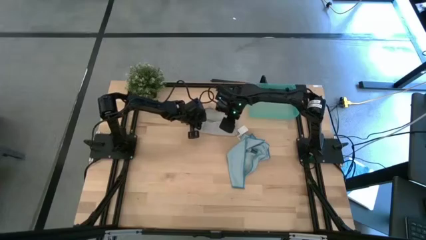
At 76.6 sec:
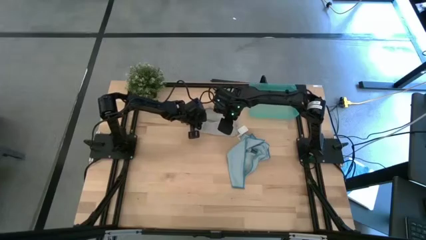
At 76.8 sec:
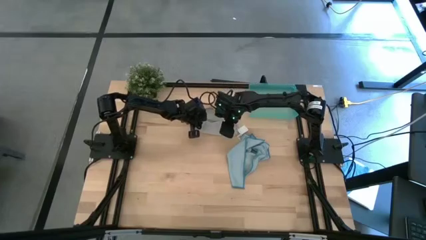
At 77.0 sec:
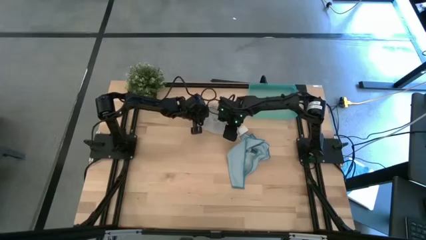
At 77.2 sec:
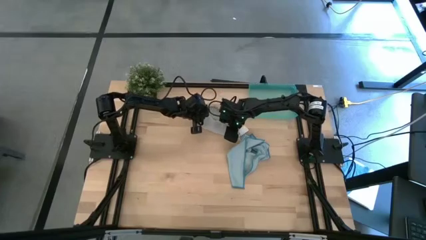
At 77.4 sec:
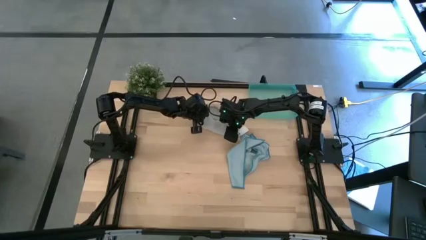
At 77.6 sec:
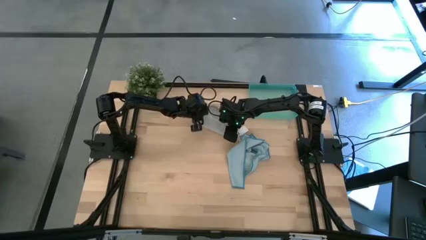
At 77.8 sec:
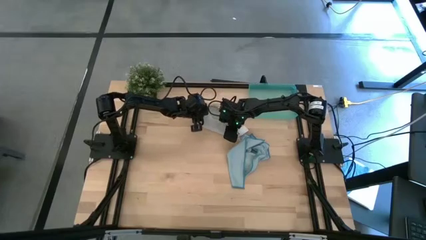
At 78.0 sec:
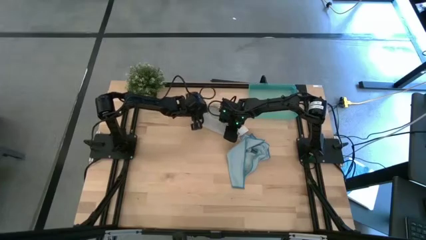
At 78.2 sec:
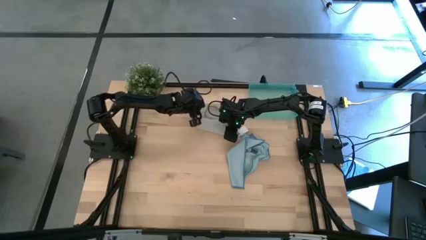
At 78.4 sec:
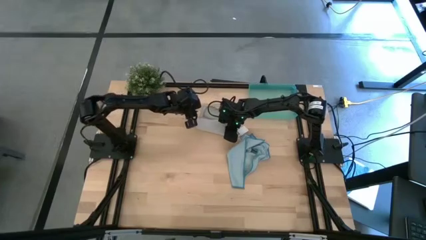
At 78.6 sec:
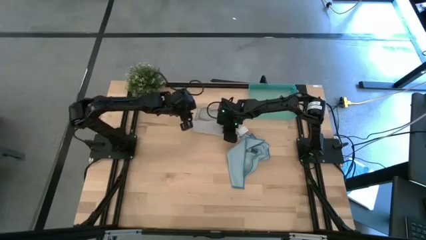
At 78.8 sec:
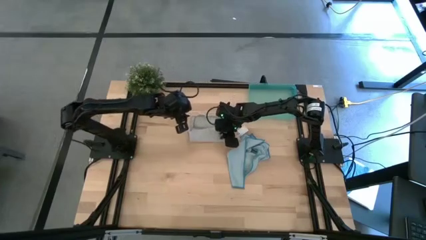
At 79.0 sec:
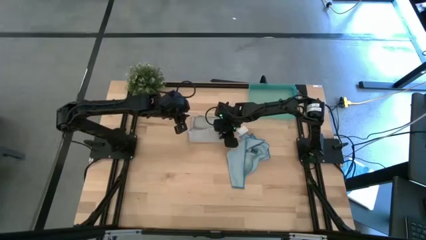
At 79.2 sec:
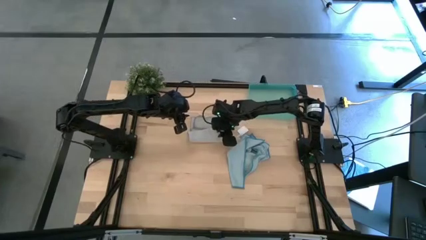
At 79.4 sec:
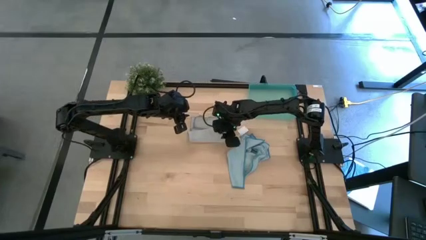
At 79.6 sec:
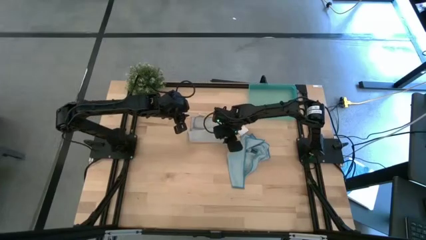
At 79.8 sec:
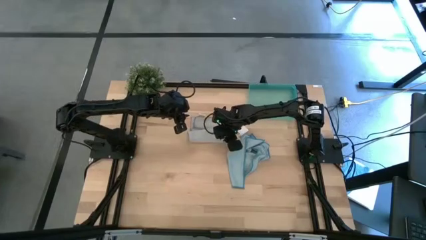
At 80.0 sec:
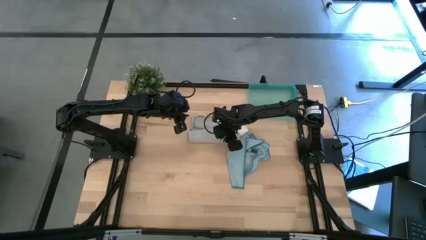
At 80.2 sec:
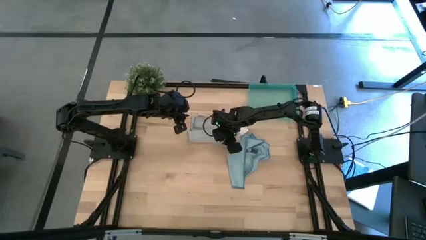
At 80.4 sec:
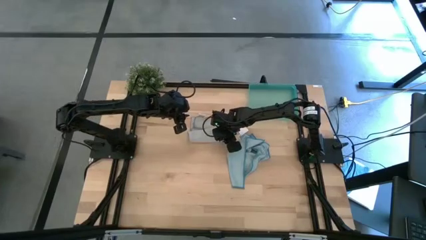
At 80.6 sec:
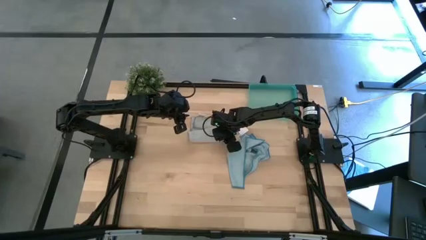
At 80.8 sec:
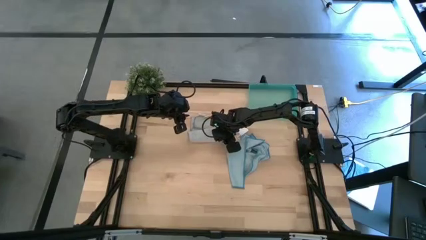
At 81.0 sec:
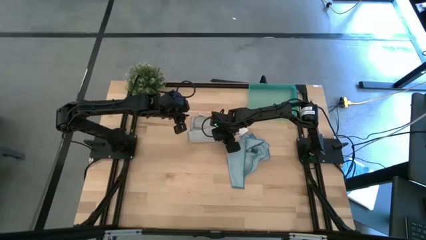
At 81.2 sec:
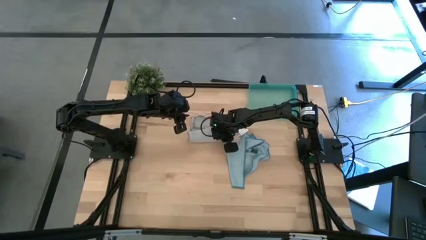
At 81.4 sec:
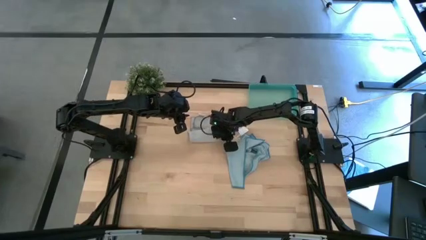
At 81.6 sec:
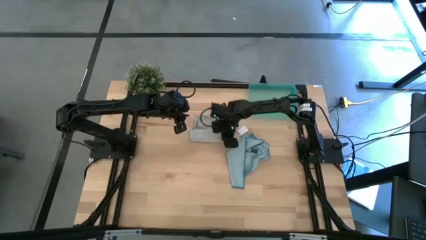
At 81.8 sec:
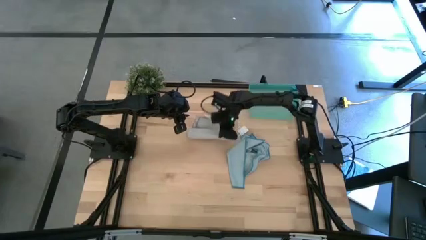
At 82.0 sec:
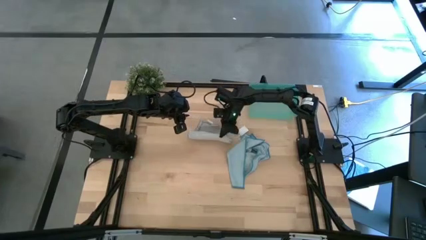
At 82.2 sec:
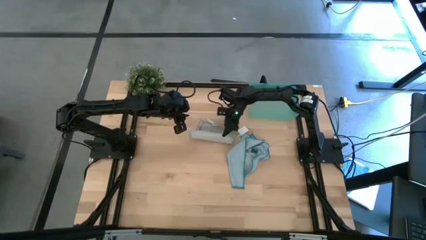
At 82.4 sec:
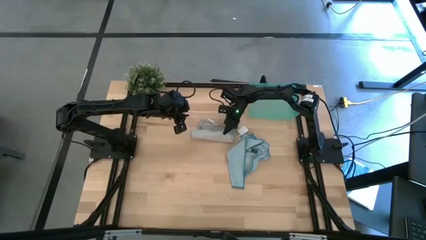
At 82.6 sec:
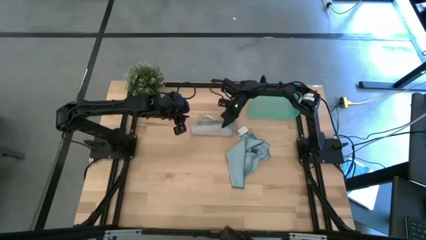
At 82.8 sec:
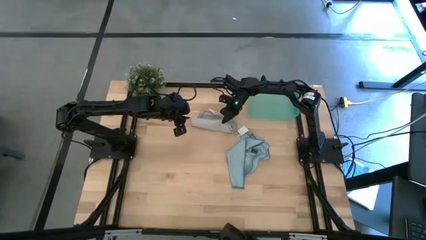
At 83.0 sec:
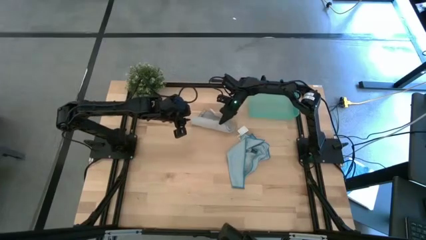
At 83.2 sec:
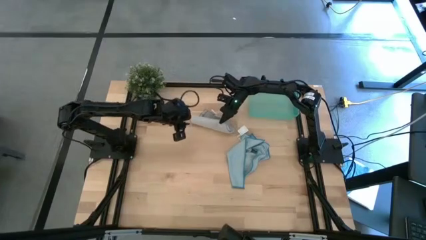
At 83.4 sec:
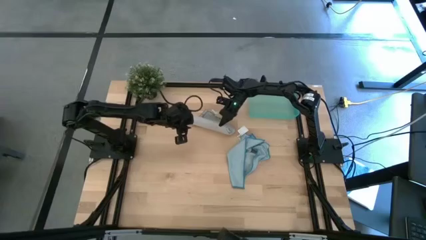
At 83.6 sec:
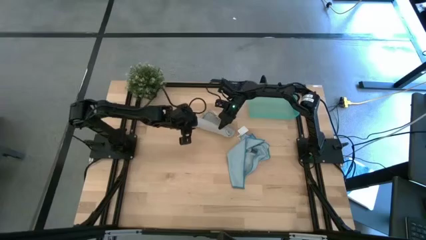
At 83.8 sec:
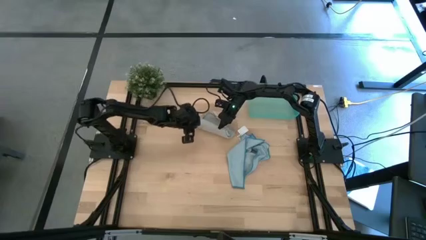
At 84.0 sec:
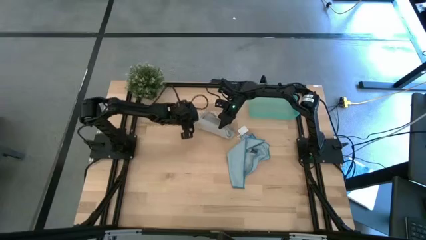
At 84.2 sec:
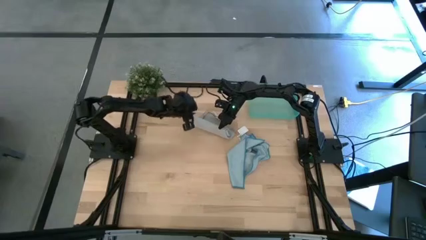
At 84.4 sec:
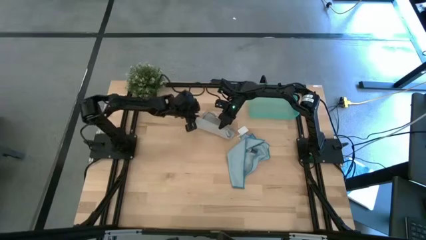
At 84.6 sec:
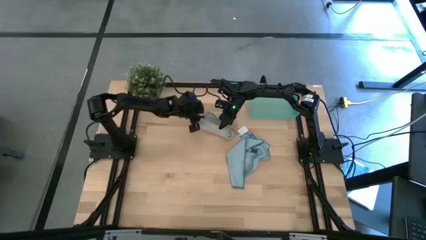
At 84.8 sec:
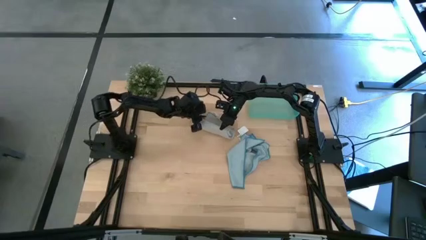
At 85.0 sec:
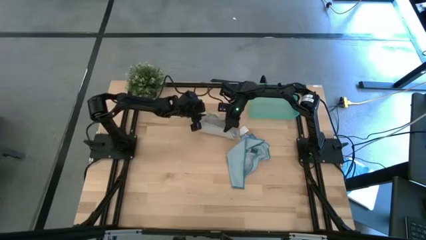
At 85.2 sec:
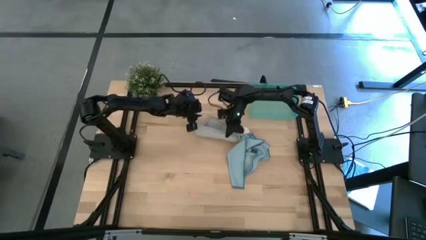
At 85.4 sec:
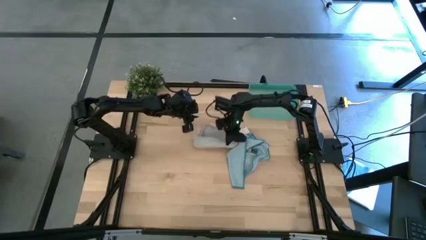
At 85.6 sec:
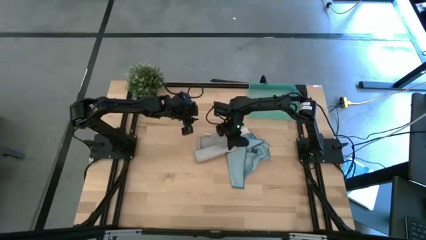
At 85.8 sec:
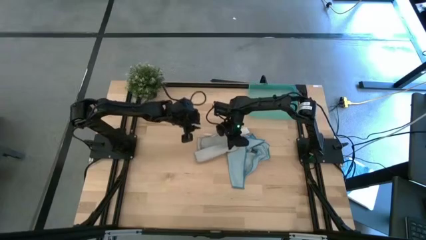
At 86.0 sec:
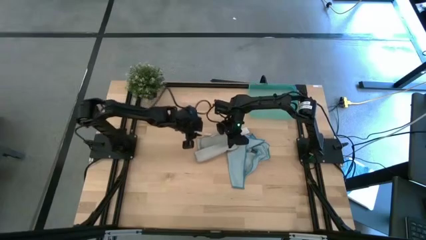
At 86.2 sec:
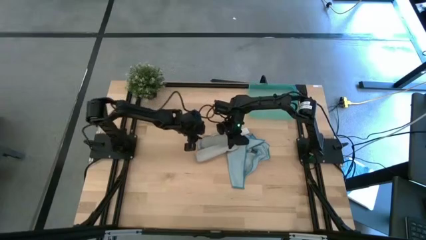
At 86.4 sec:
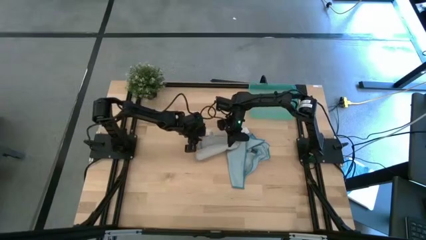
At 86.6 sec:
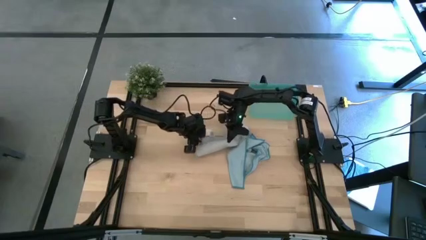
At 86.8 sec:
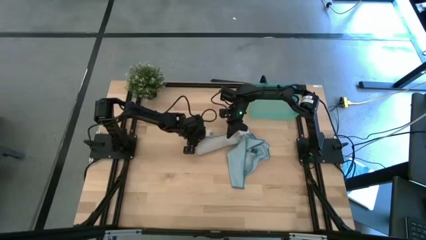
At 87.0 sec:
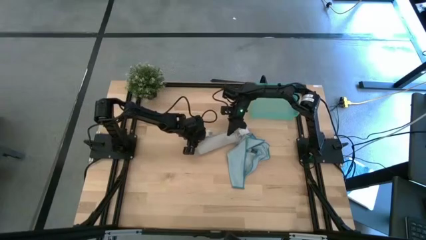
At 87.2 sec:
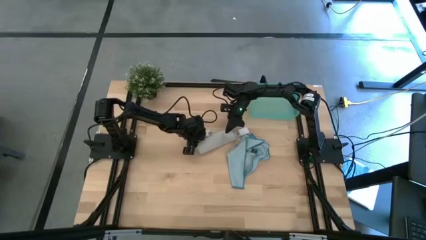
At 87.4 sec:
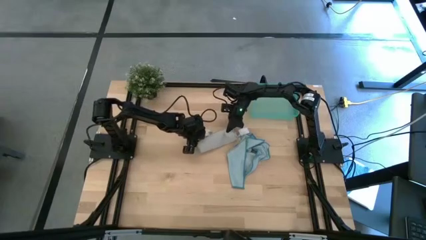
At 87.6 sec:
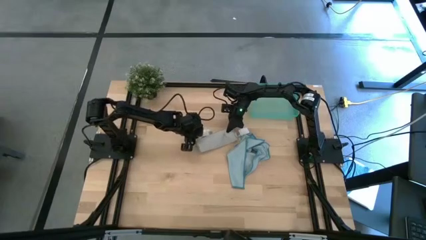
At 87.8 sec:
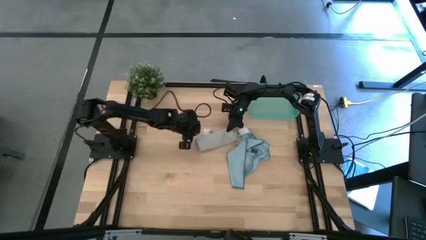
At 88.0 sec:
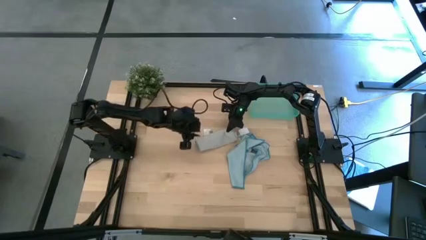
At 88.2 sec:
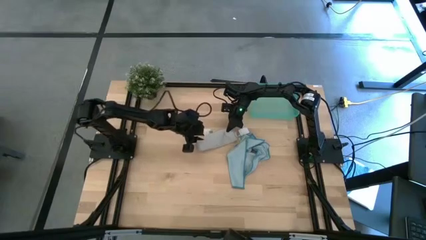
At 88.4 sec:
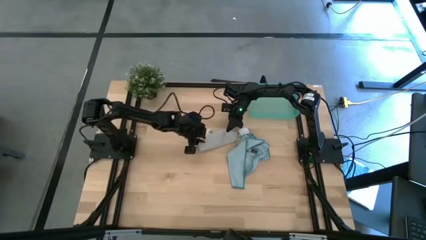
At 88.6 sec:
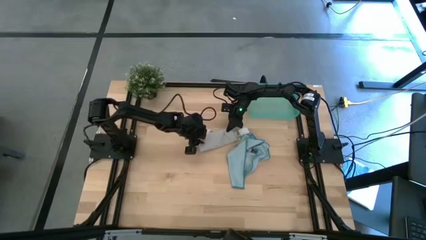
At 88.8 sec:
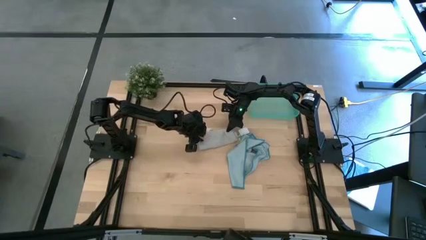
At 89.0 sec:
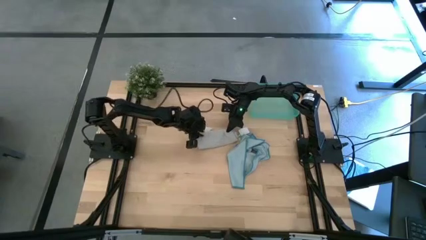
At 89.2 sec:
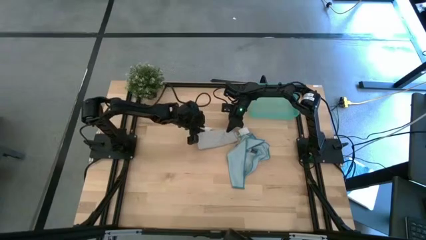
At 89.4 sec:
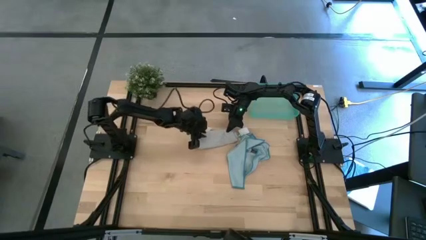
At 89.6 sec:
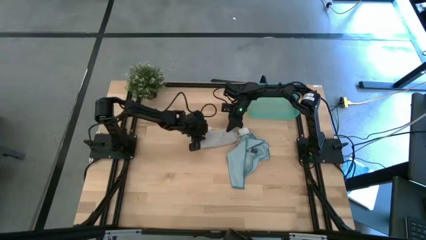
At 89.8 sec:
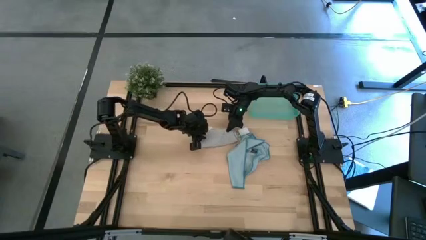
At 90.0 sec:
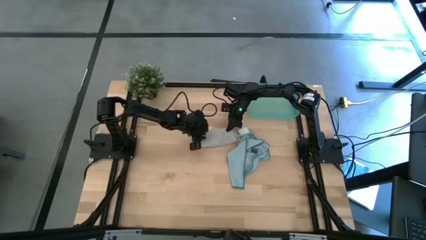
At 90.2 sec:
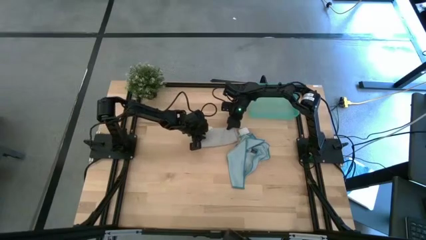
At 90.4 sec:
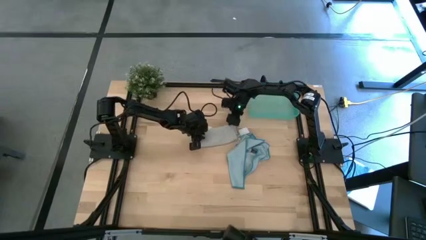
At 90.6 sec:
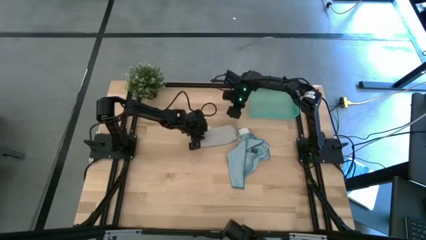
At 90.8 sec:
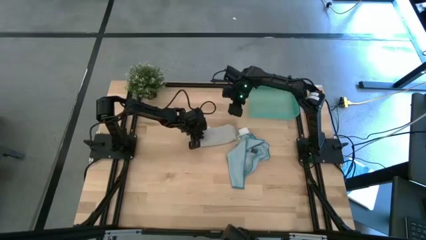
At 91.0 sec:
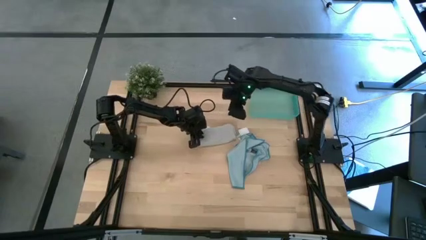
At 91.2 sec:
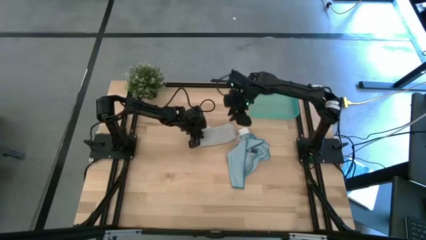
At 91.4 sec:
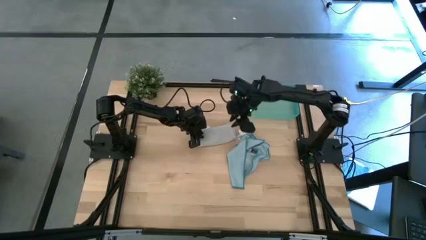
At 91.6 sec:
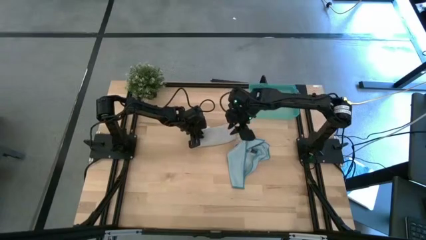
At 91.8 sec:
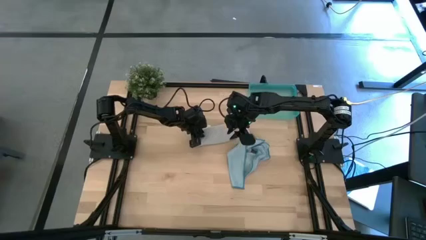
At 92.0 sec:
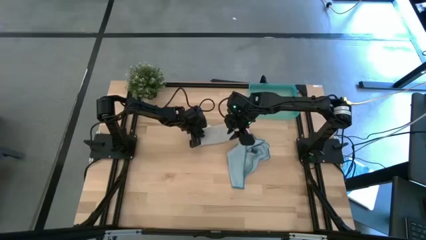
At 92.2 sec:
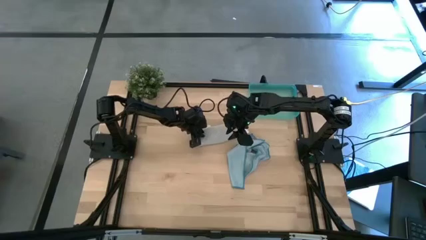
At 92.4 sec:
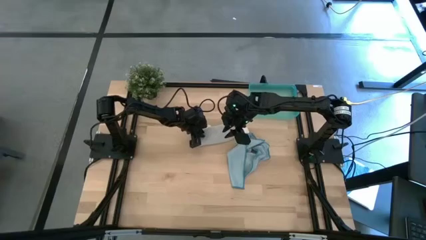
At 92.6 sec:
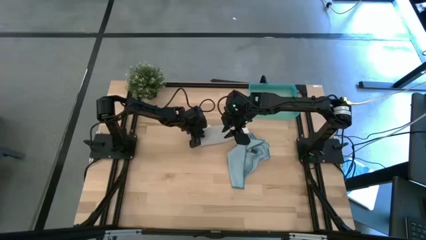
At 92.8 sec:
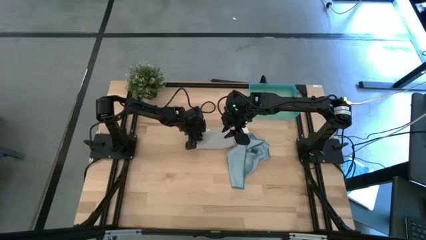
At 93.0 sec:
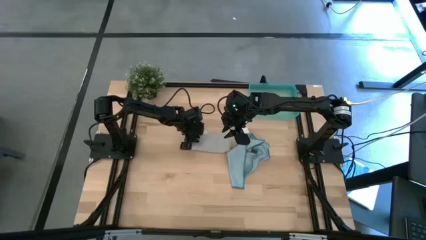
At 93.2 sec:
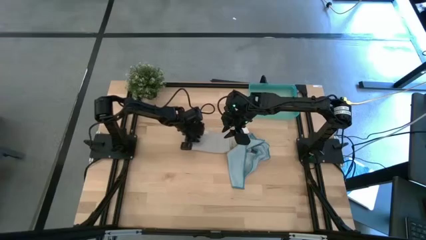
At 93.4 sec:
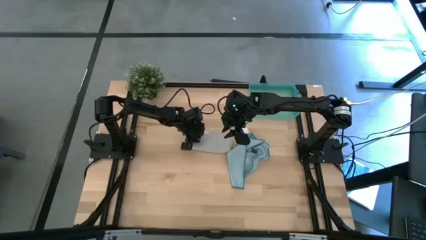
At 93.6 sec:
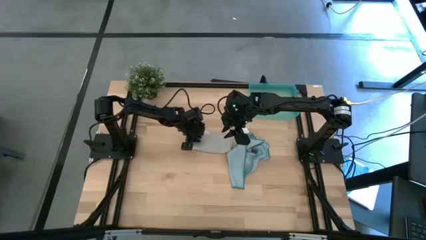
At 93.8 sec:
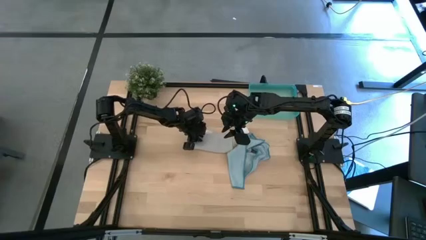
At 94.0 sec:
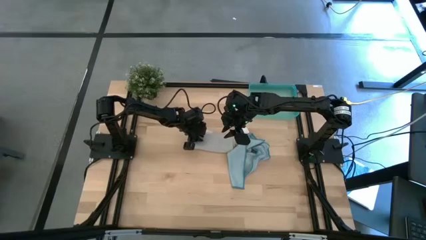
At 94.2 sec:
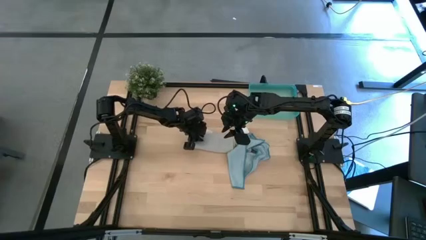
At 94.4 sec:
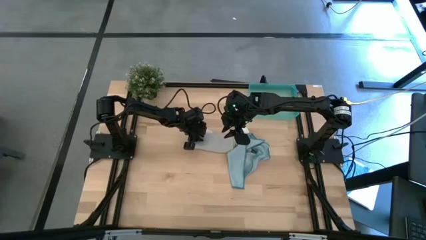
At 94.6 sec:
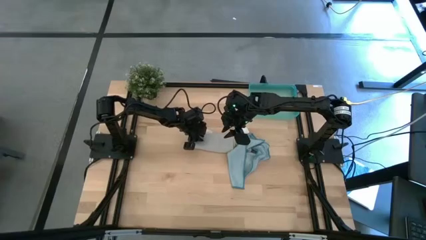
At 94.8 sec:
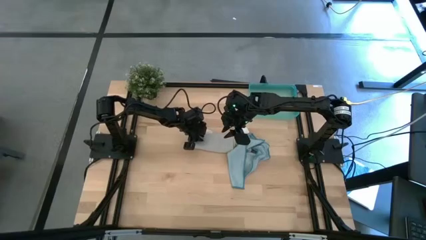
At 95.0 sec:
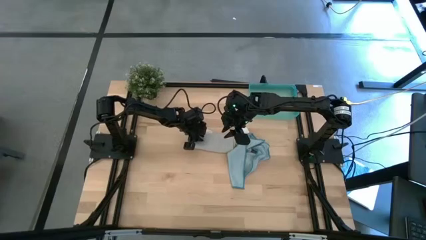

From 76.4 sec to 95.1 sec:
Task: Roll microfiber towels into tight, uniform cylinder then place into a basket
Roll the grey microfiber towel
